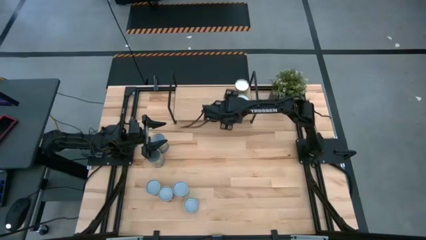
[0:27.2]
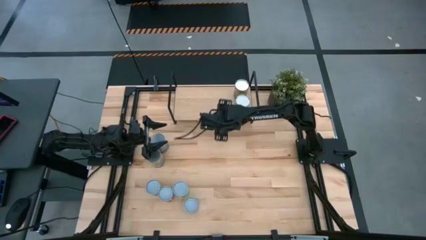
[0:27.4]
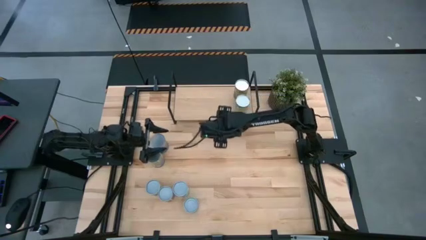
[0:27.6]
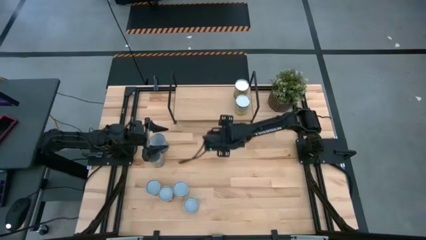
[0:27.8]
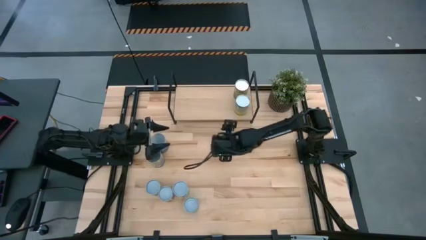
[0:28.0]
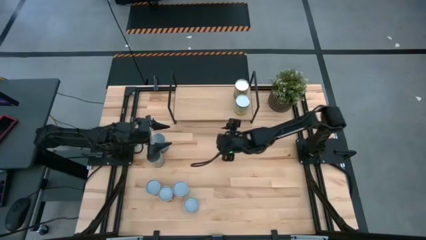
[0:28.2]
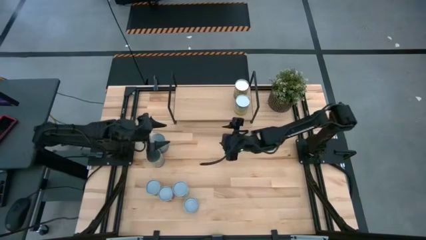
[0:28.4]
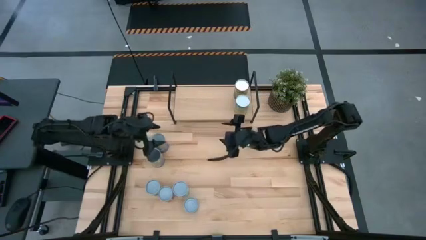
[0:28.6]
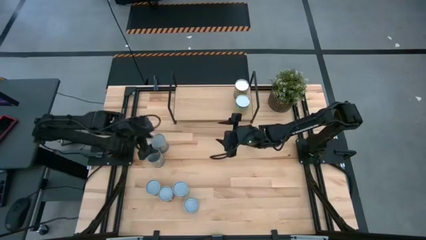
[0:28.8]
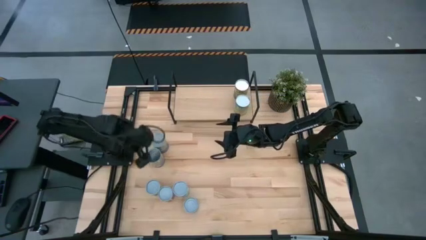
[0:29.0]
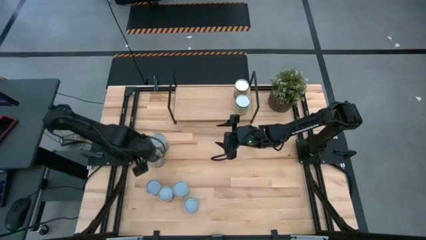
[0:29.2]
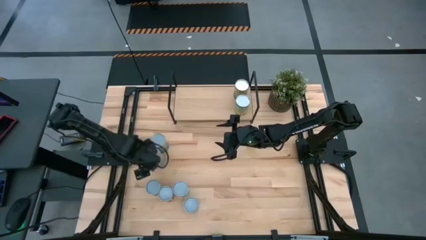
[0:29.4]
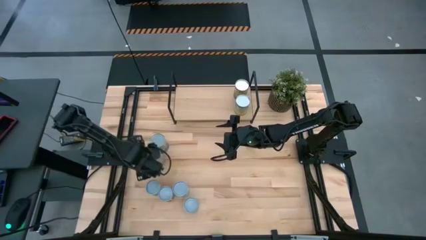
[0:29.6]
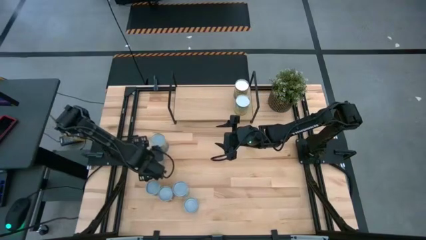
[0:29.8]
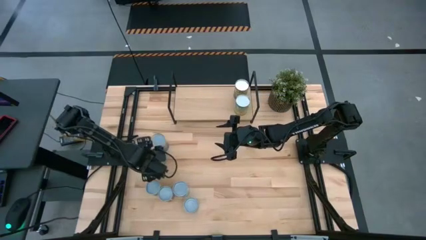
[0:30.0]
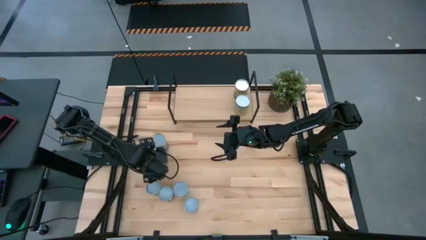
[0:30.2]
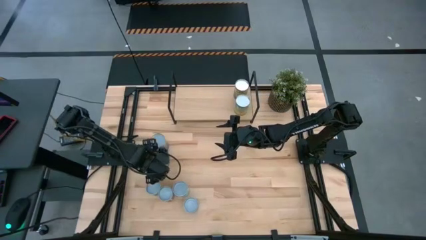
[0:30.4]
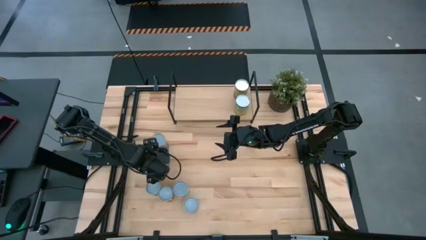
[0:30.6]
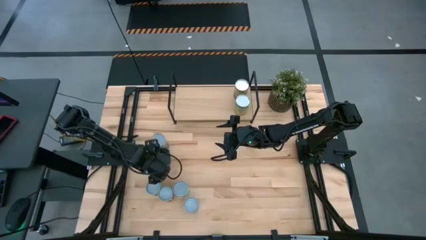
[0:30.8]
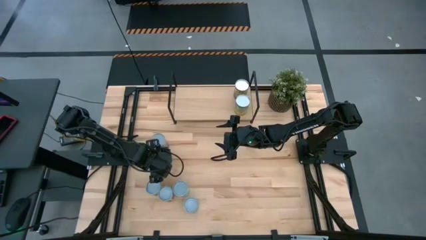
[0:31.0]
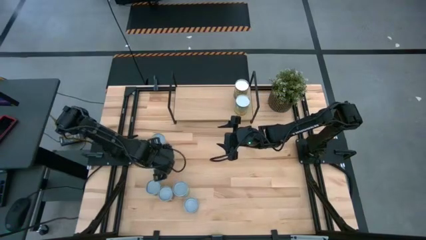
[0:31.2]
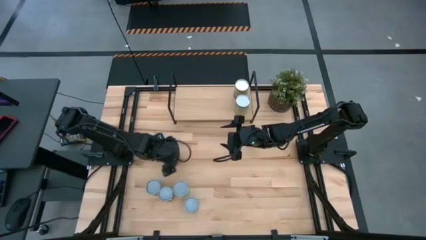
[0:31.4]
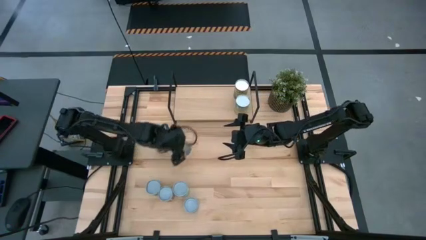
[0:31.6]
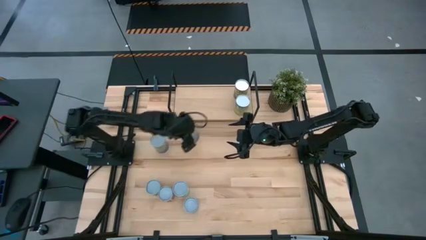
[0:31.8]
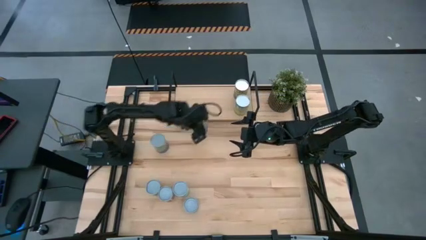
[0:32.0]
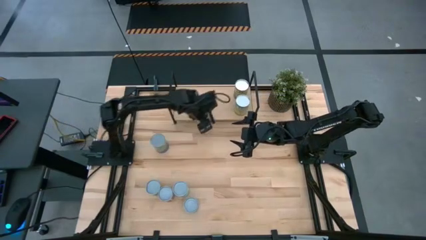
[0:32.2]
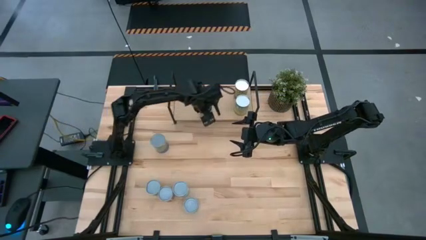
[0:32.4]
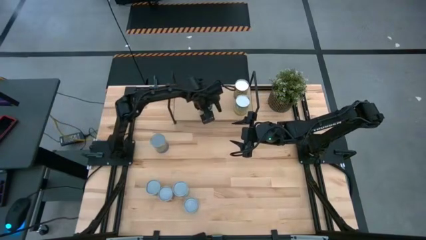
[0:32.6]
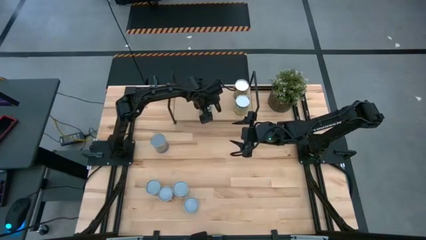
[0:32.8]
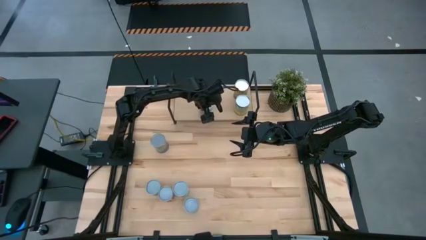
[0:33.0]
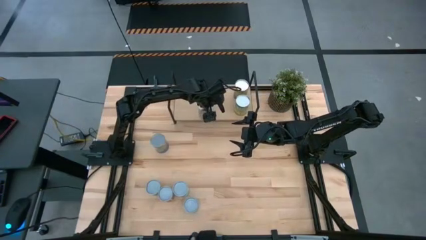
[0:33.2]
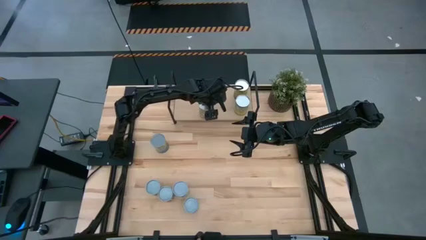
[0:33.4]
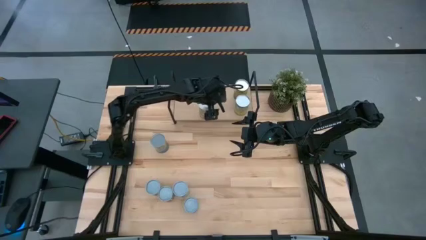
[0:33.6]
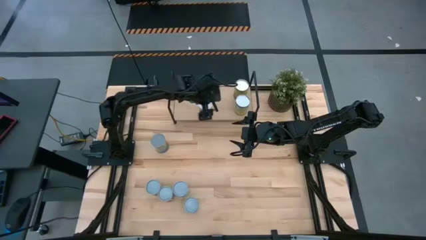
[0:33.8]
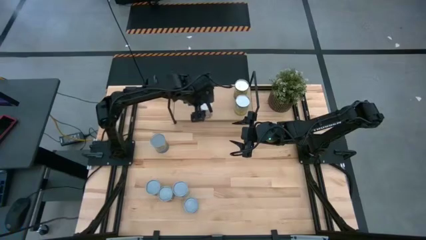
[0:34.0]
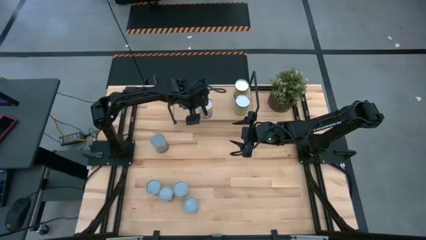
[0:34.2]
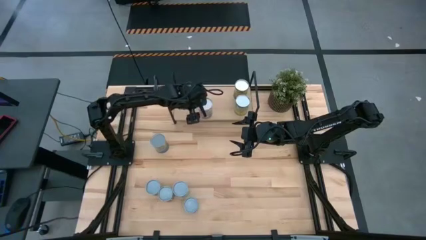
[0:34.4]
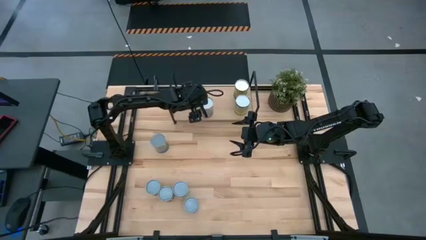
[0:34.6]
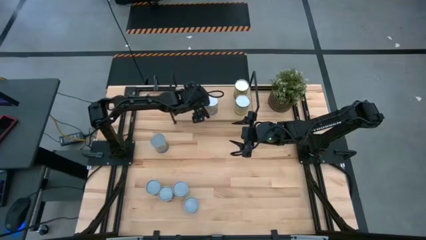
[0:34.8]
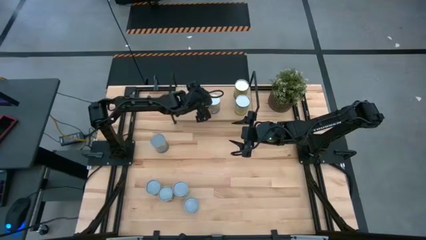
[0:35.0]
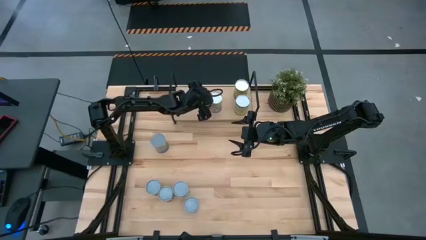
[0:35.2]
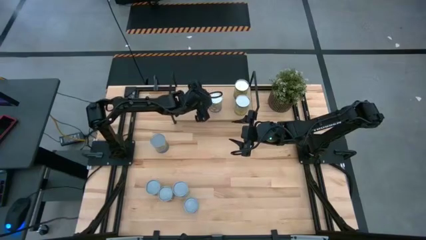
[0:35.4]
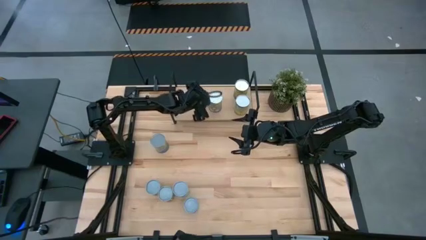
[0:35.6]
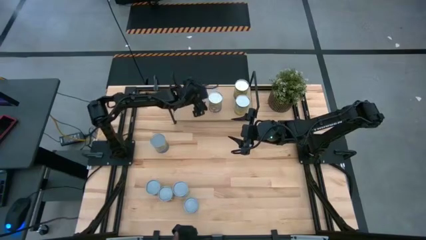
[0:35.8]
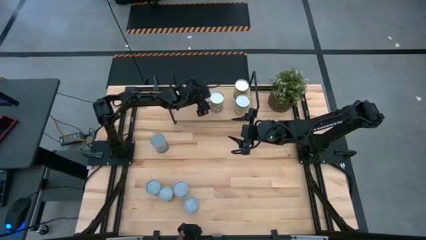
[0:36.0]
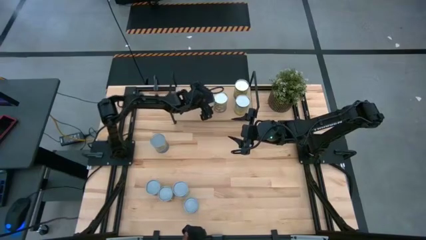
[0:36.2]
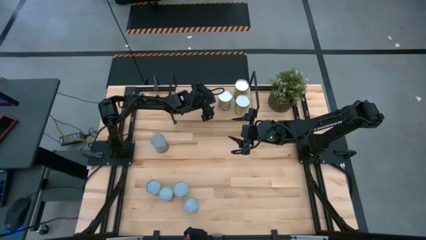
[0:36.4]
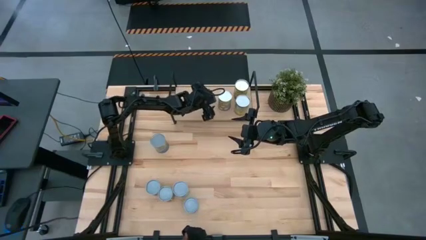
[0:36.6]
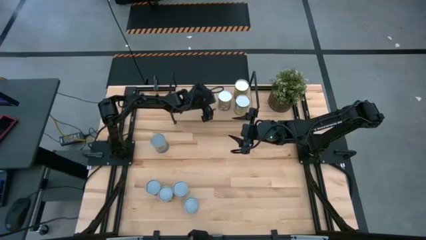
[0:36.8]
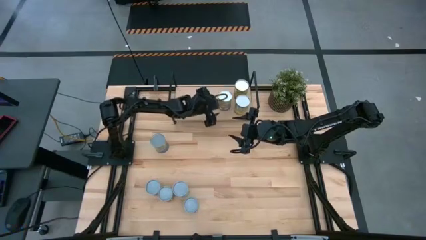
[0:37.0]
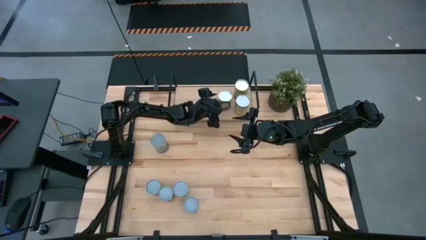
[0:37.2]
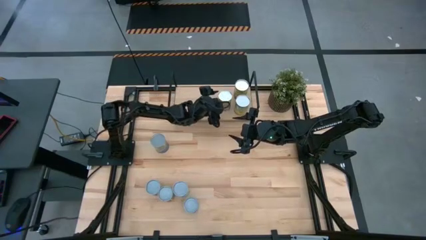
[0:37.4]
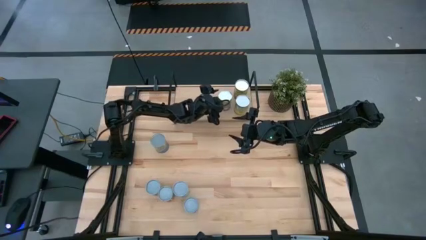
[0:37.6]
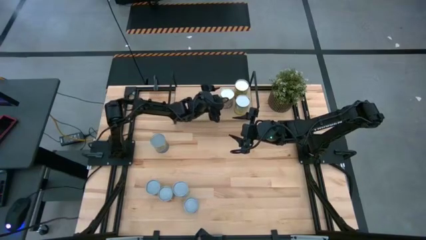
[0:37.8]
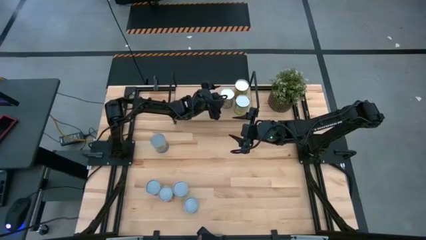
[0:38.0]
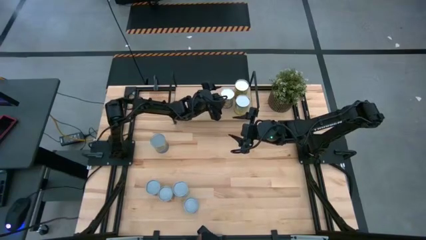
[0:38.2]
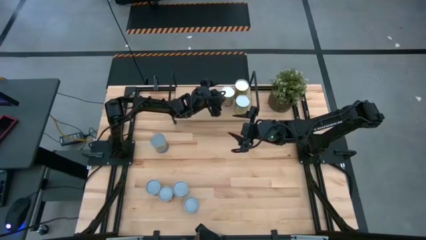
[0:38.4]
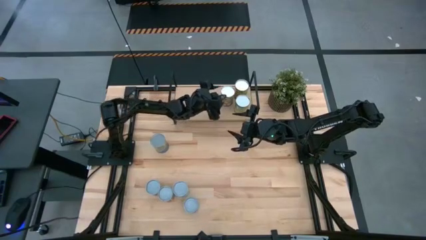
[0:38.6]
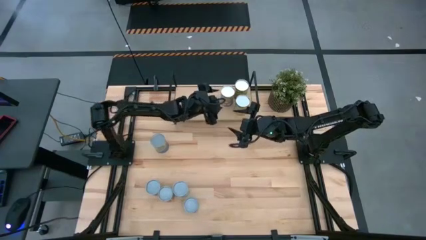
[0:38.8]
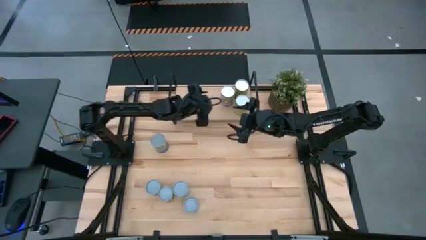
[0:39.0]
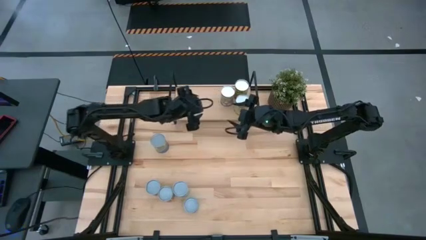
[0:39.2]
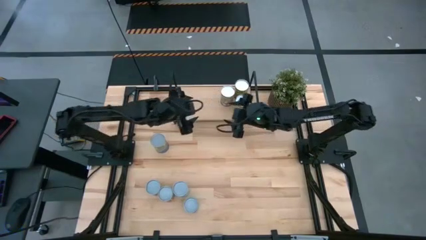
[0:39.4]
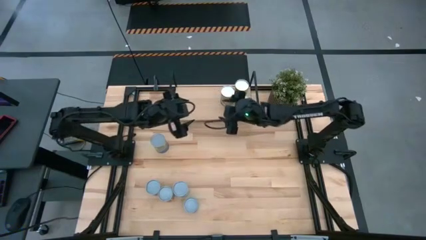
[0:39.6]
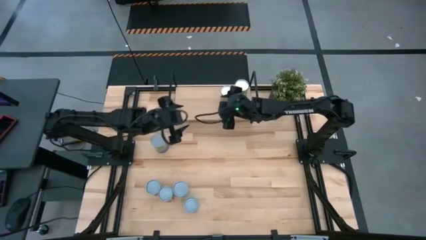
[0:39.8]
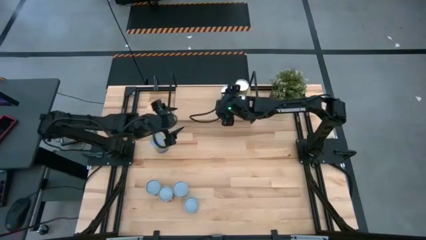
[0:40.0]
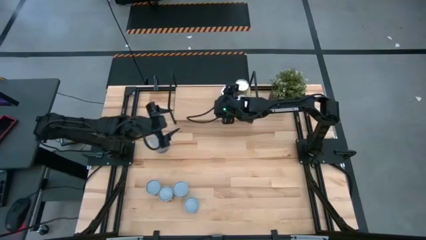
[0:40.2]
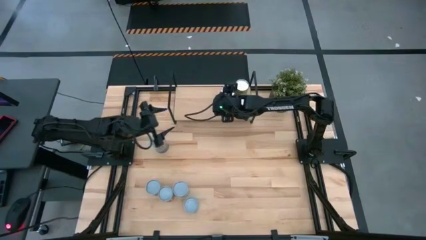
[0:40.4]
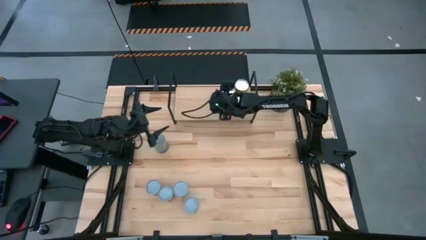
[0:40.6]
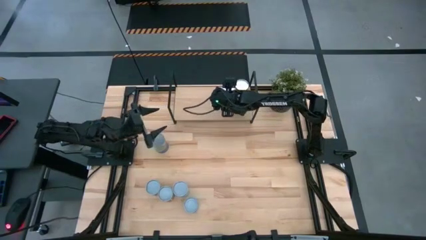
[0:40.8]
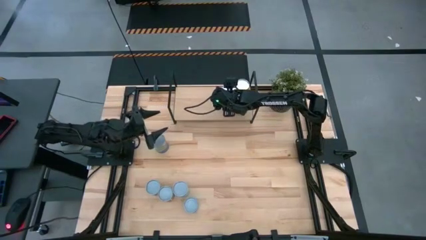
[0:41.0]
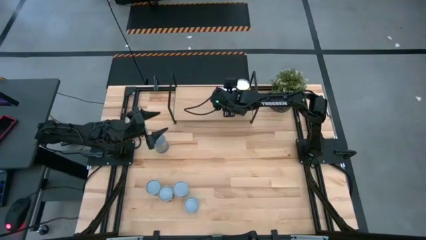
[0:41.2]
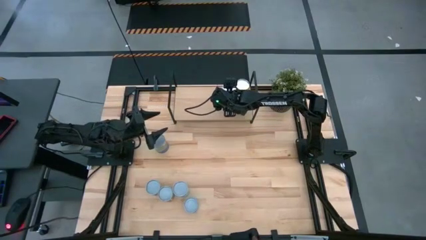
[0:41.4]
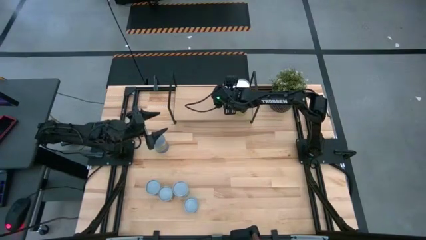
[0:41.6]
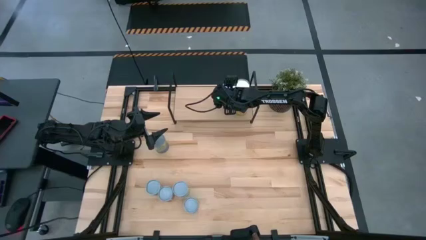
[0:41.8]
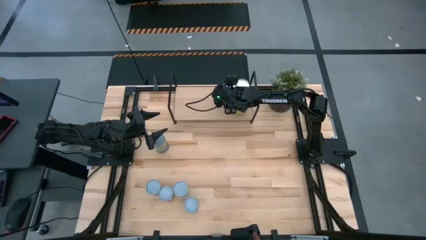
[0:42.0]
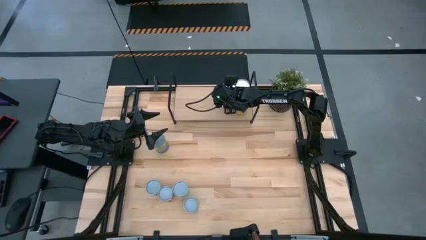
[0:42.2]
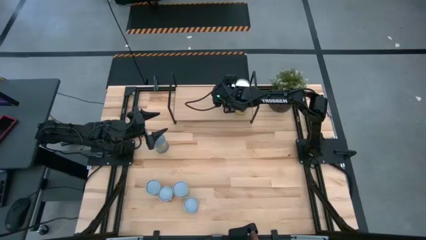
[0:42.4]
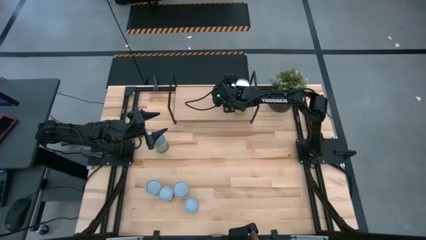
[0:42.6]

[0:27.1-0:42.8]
Task: Pick and place cans onto a shelf
Put the canned peaches on the shelf
